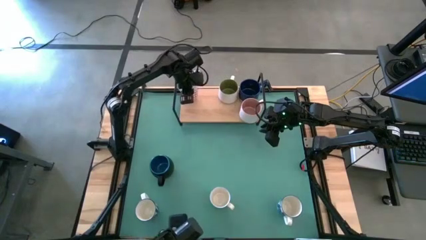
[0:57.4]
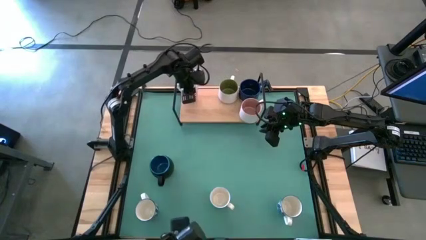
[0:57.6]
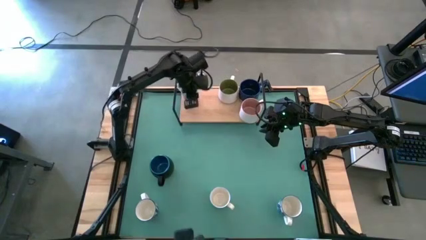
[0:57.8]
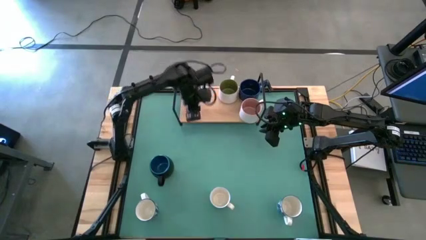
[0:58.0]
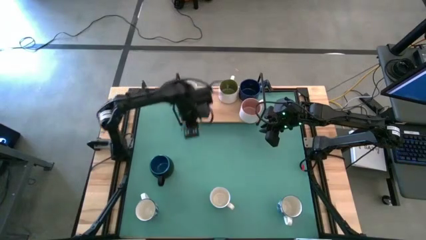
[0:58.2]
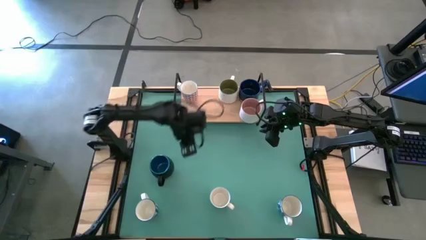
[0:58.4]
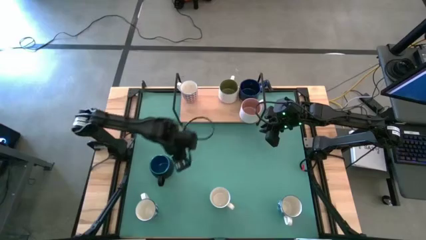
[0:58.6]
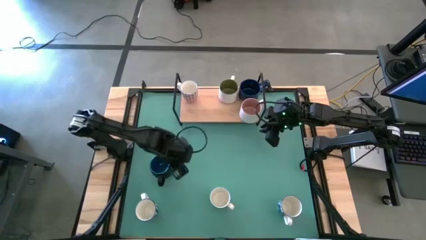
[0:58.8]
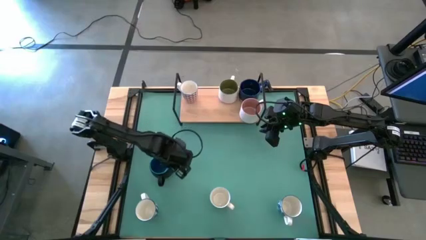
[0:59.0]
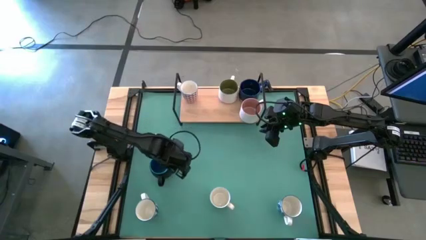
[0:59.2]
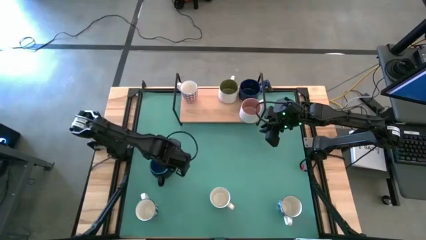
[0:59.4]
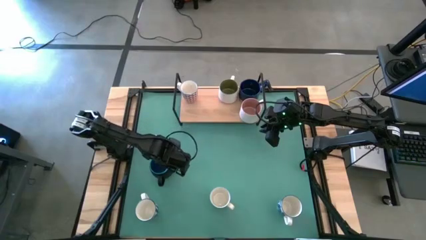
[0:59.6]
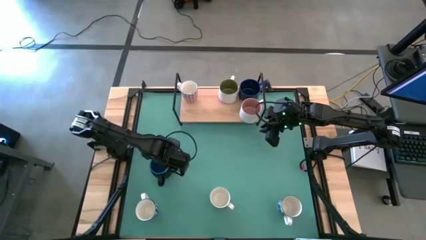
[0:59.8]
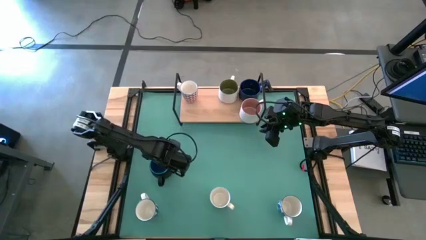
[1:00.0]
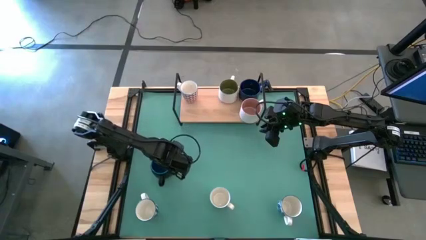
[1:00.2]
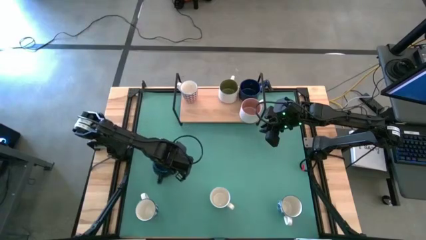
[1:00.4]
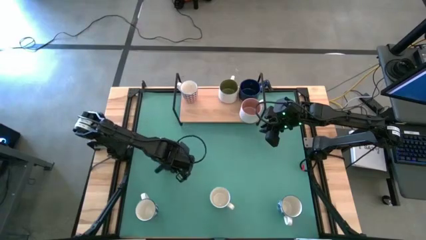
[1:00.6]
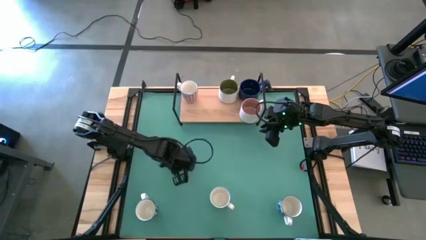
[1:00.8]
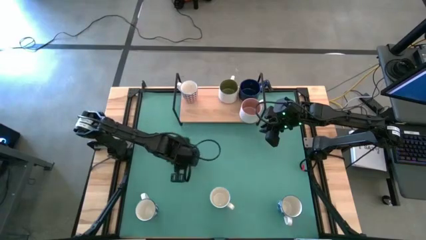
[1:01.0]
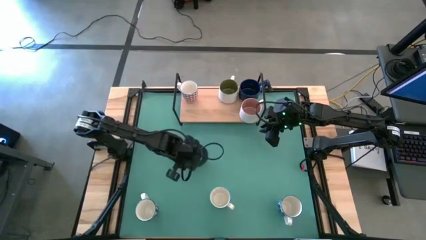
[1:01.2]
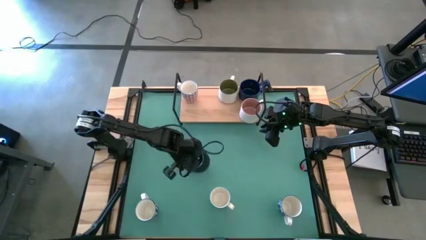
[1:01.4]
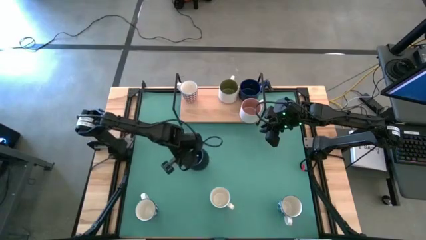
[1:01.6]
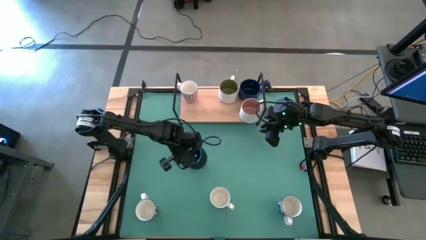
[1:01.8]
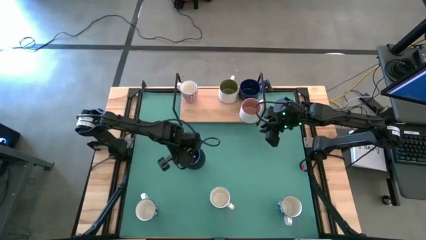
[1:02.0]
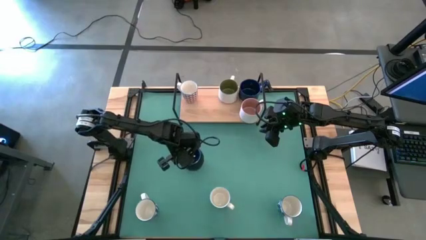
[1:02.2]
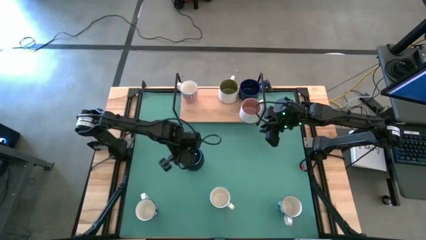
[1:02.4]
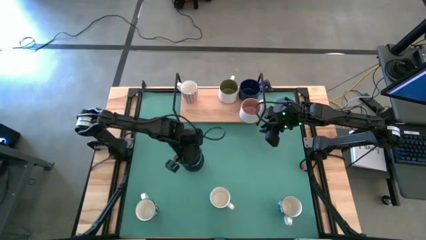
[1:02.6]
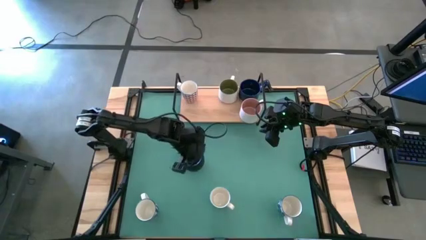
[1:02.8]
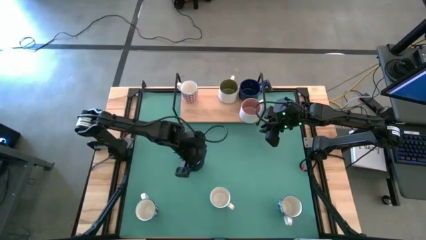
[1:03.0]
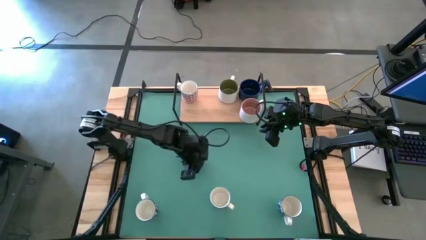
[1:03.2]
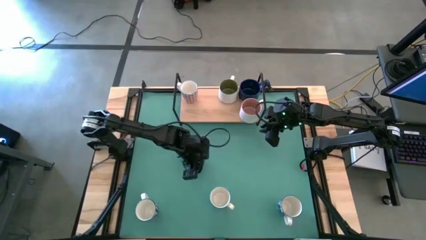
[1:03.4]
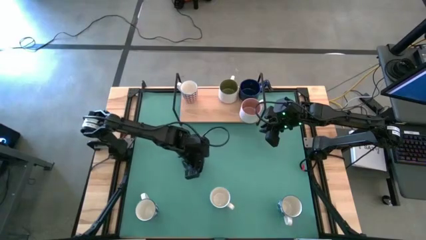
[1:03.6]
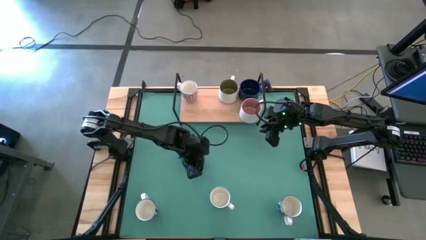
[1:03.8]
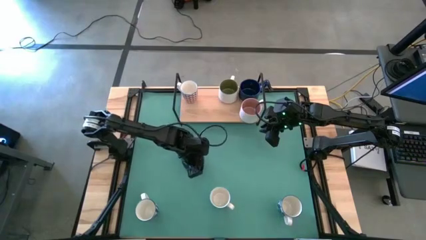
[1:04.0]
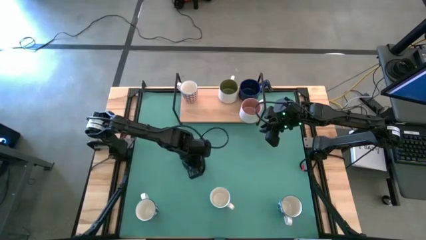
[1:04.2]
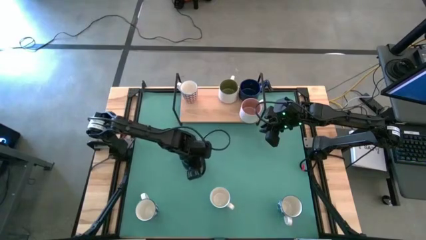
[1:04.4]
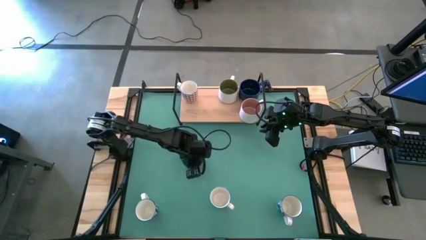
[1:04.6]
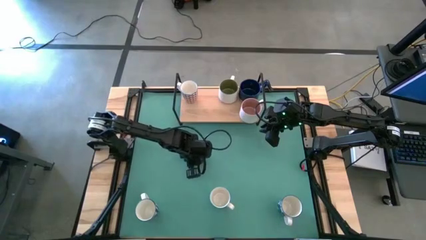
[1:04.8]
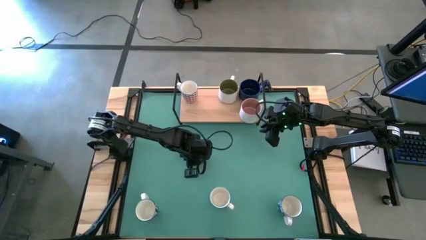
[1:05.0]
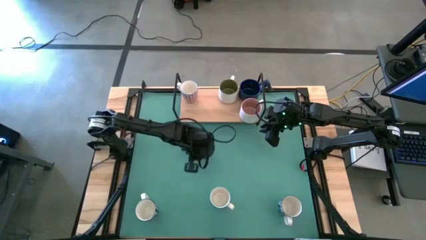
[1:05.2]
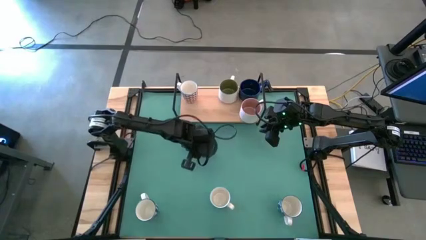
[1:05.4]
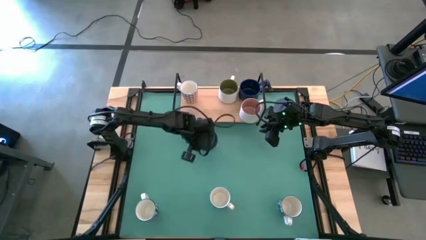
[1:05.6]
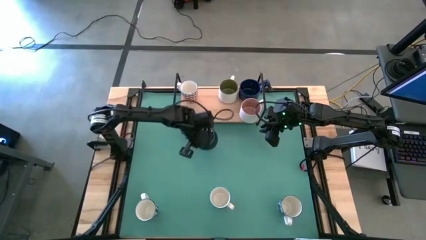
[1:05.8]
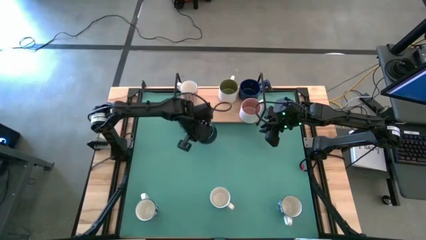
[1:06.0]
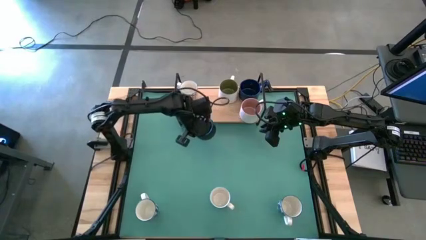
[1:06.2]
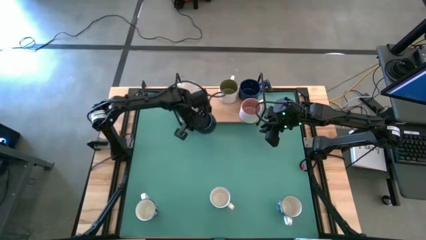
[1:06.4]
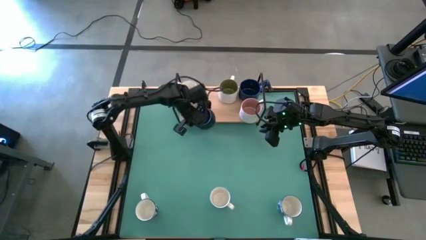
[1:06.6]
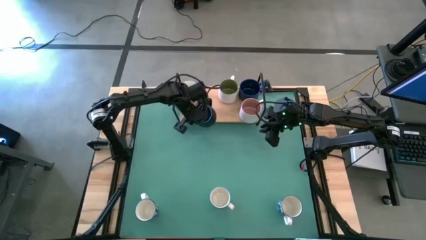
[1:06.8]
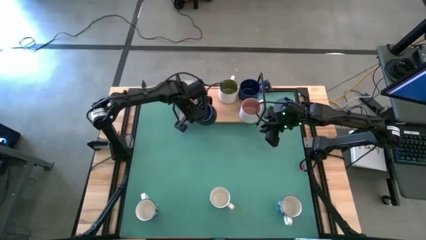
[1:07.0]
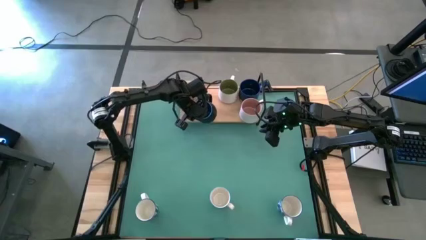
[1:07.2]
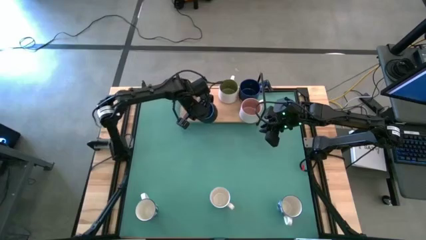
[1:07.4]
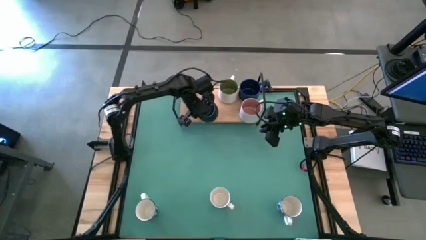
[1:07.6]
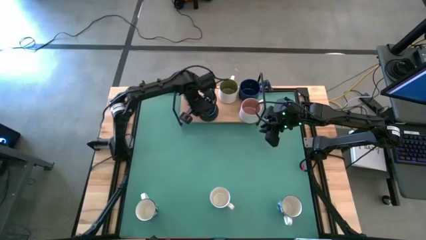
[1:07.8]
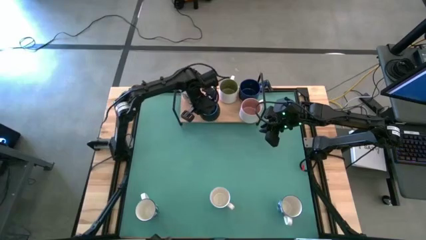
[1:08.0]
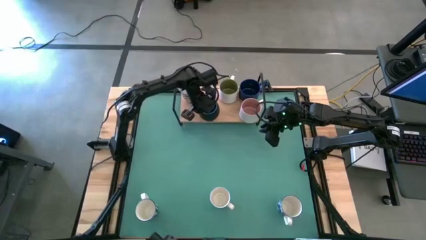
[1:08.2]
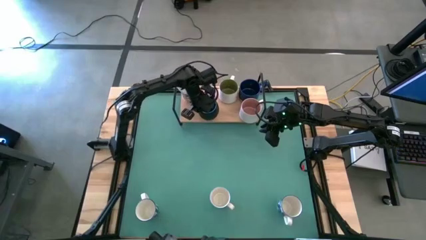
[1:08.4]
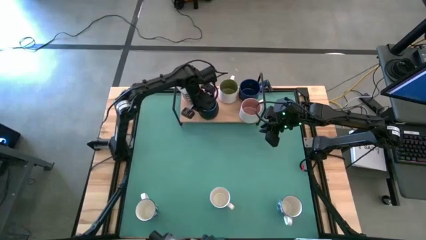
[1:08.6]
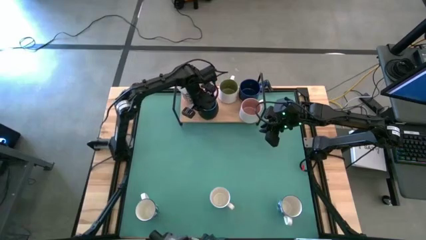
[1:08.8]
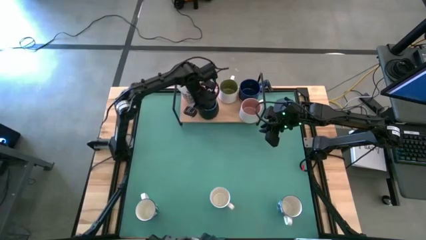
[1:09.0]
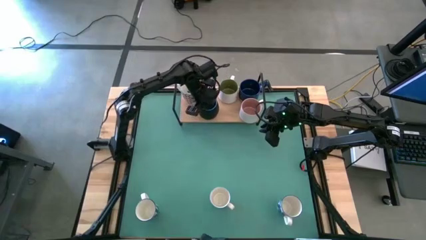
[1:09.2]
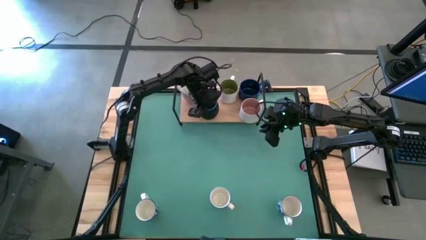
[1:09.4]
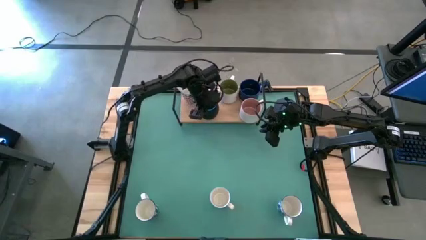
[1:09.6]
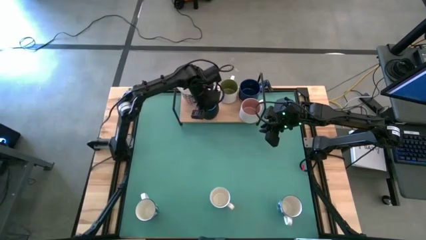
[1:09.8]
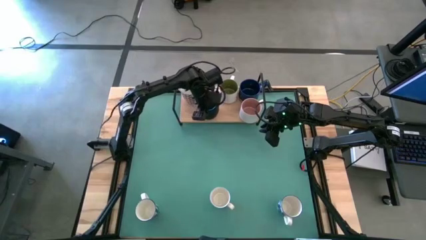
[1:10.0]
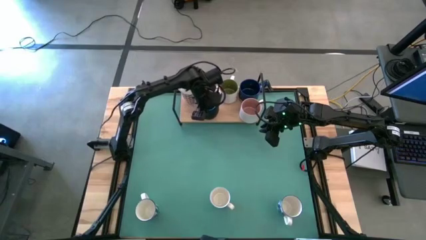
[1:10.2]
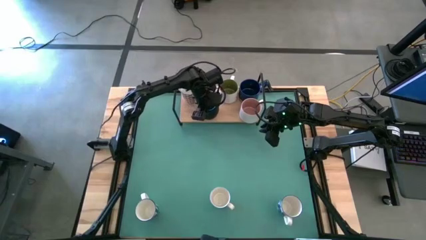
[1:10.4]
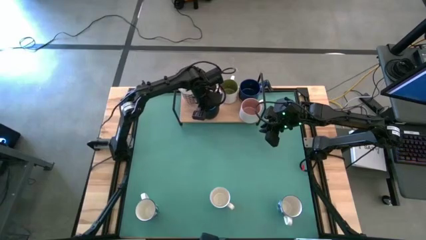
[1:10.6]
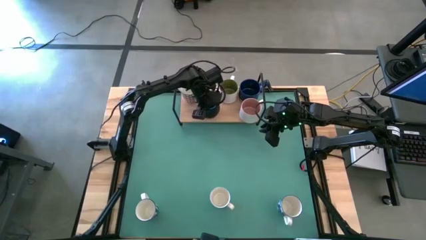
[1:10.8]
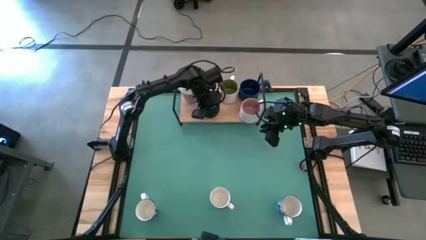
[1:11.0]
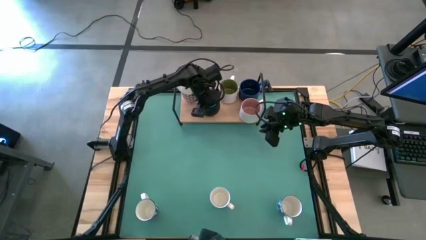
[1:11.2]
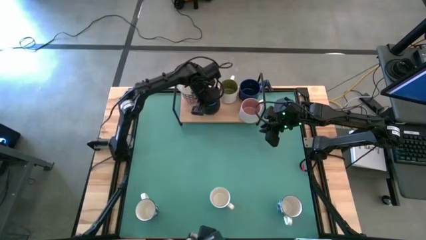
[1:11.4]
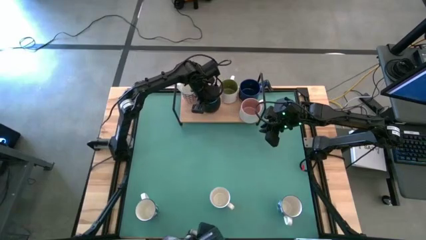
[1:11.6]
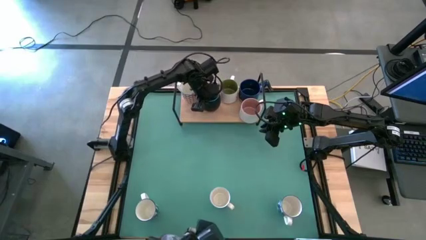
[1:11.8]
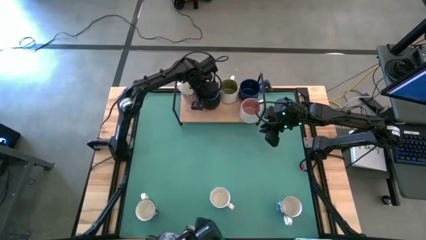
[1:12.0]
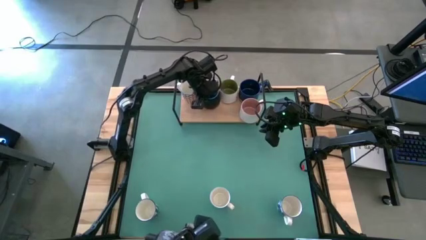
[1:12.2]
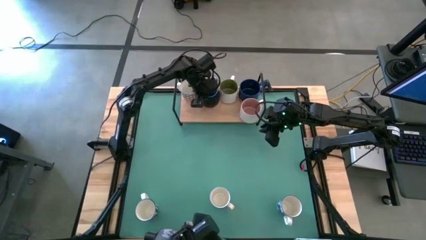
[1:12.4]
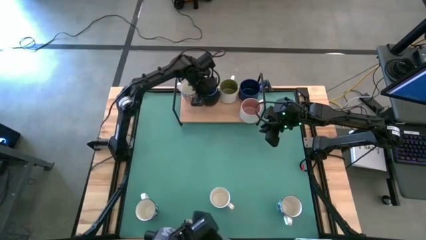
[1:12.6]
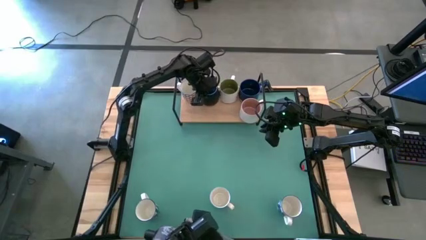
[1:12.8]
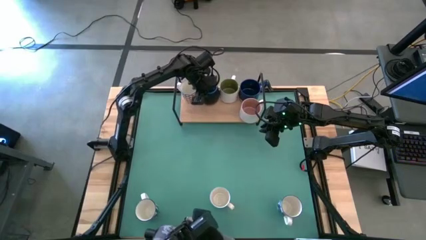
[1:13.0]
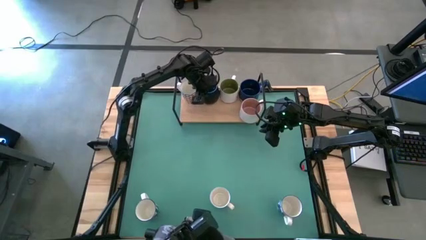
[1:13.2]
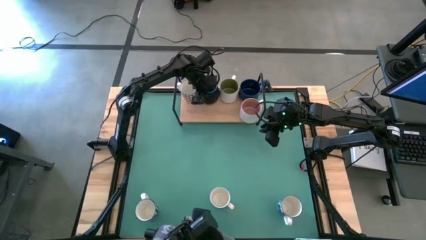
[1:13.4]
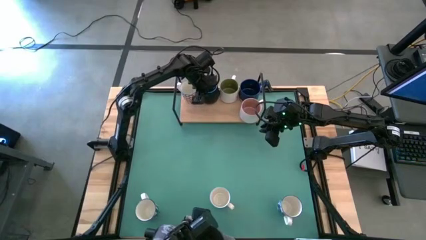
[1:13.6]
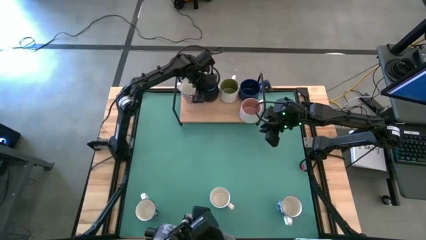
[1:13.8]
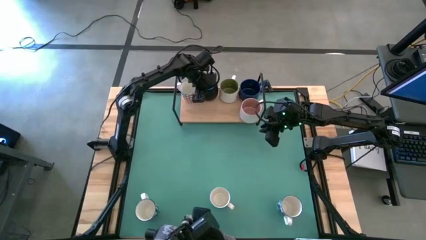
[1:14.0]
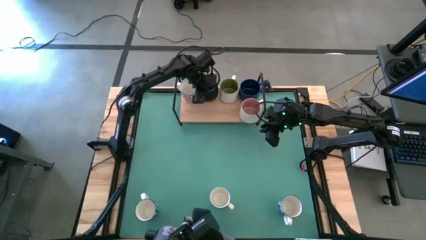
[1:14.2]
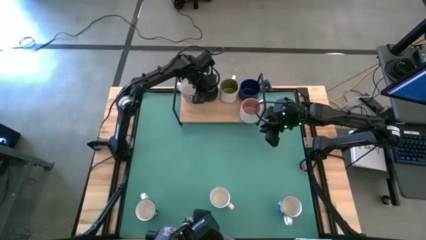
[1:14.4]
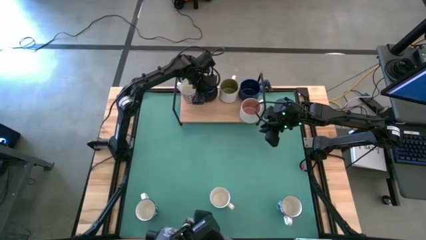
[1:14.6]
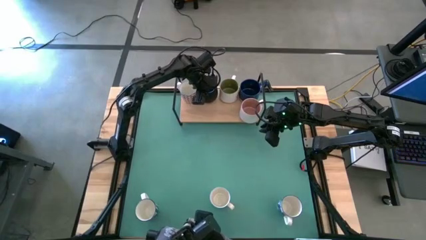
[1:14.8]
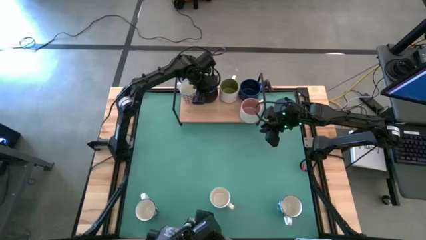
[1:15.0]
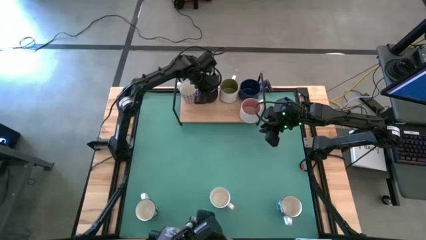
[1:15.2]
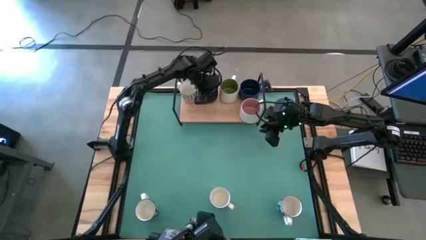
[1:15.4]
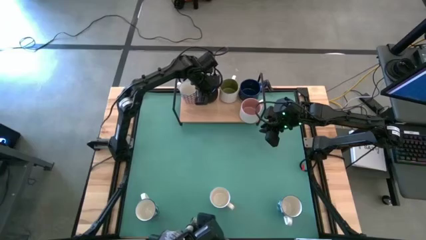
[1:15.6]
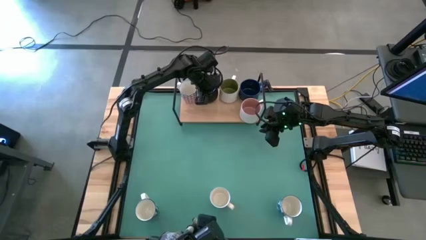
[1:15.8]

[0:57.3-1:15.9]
Task: Place coffee mugs
Put the black mug on the shelf
